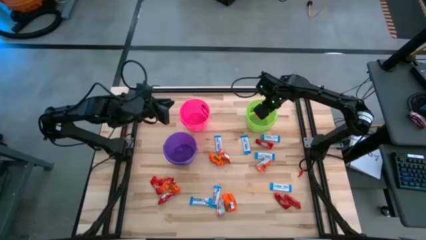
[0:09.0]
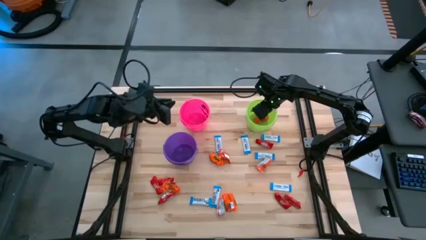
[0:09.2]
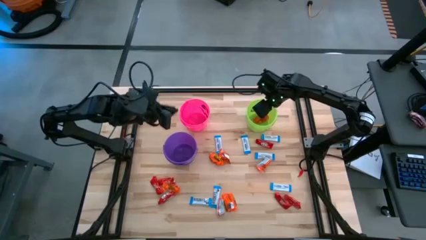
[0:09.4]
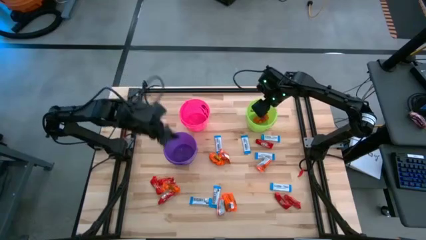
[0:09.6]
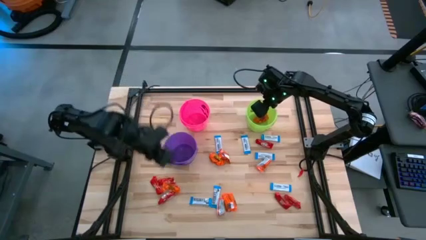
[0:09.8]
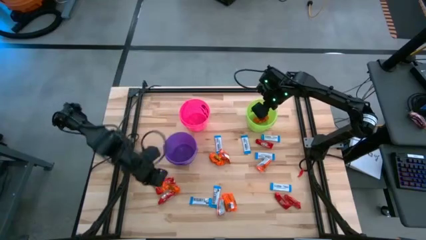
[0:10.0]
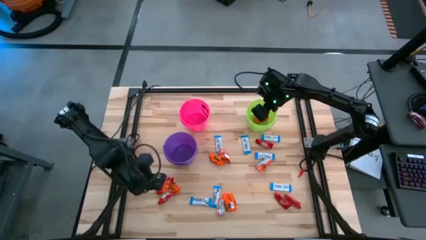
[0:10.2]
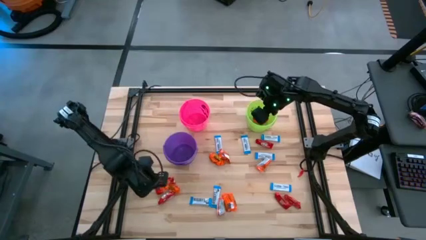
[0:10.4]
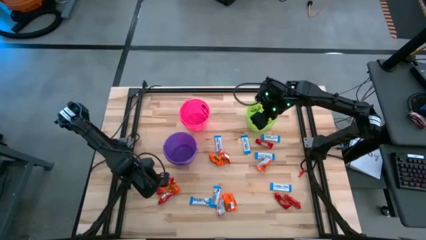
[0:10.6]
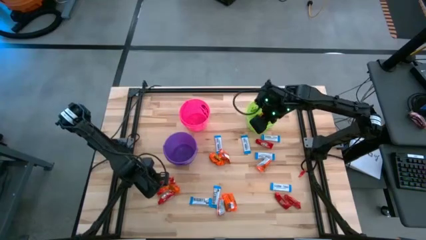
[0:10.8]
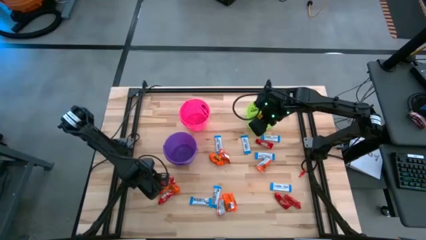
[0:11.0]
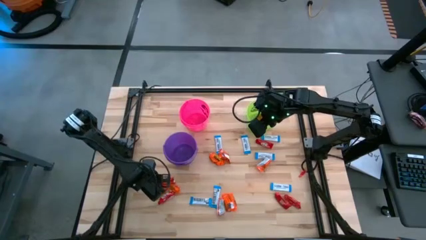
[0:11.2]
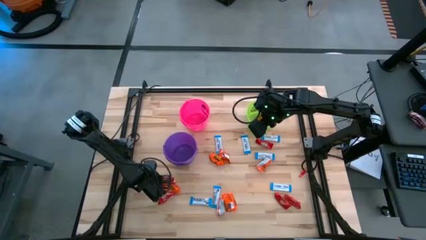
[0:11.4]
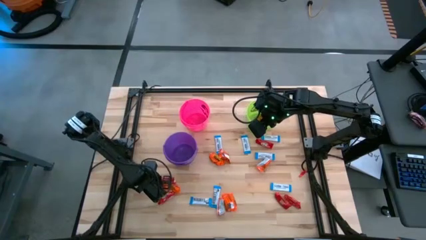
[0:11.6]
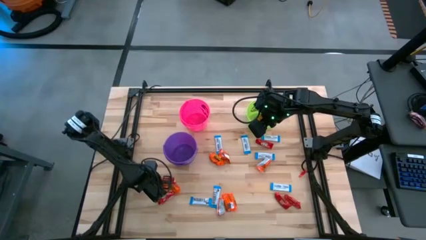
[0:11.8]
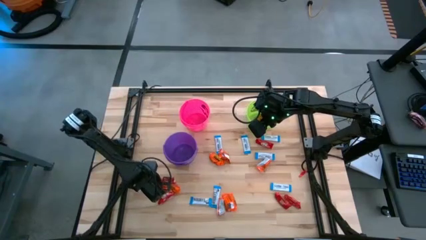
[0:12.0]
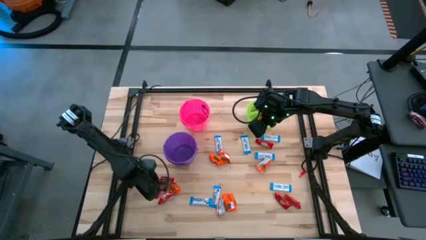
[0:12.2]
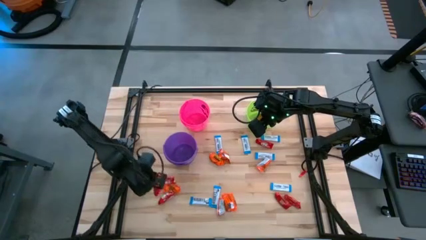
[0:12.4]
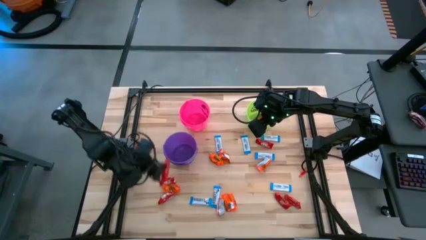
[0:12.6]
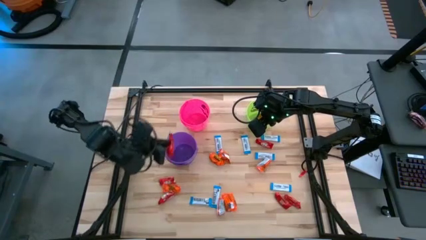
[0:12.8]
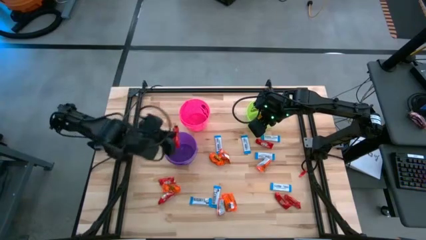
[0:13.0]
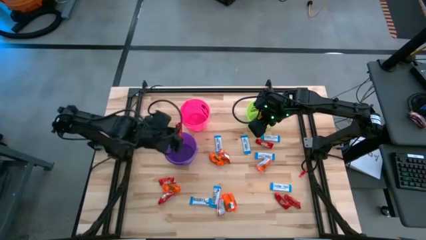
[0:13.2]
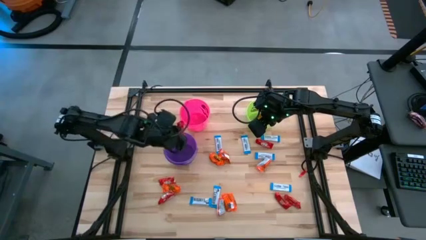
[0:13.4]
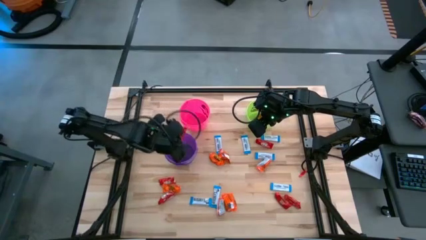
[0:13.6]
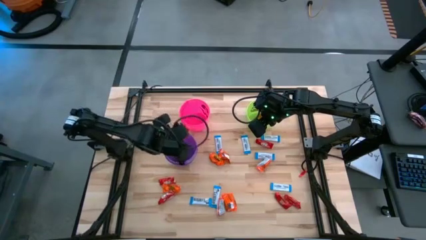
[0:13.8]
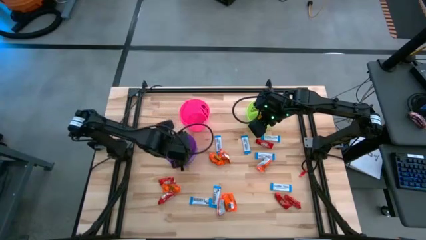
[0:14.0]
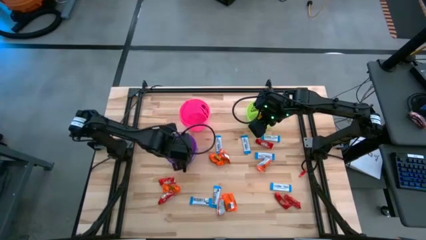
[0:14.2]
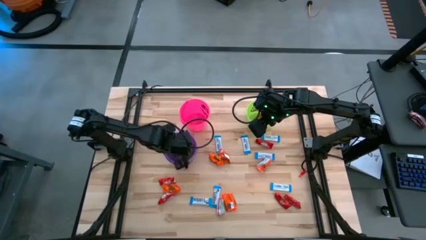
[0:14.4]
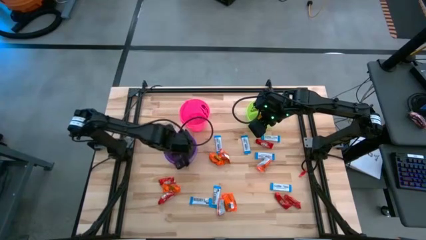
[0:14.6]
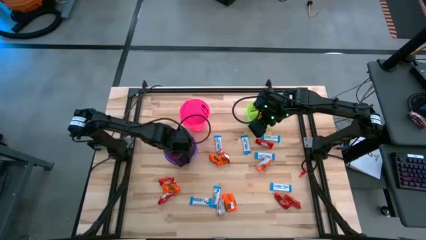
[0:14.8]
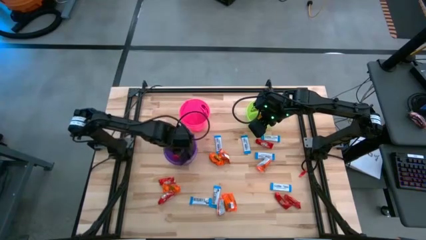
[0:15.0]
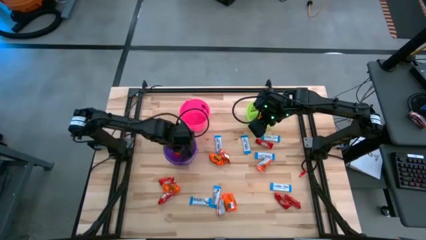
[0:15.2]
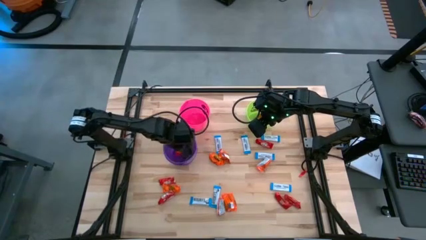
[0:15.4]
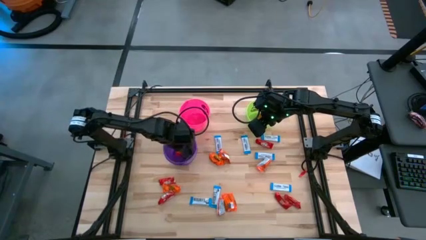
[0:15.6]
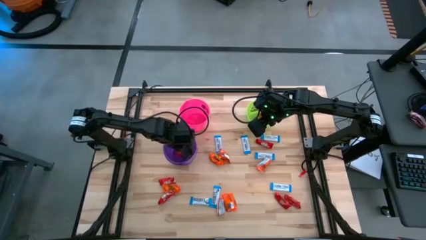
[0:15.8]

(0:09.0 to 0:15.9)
Task: Sort candy
Put the red chocolate into the purple bucket

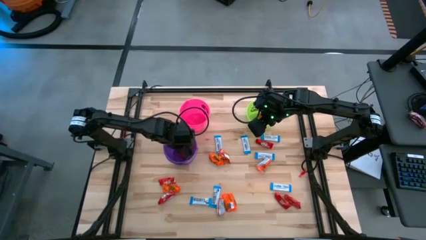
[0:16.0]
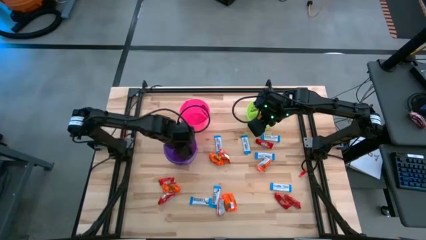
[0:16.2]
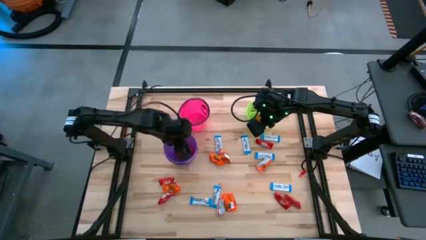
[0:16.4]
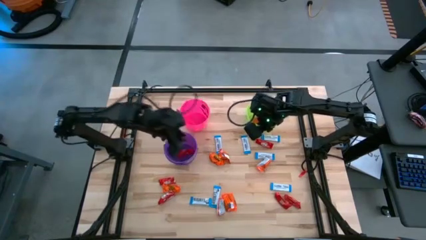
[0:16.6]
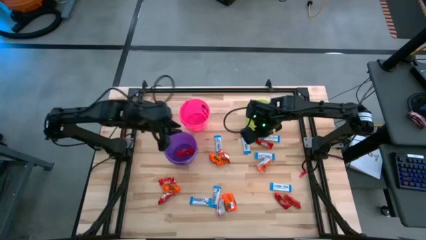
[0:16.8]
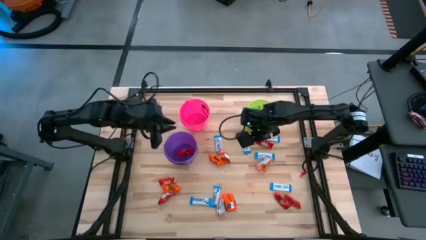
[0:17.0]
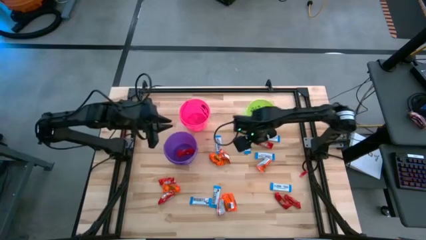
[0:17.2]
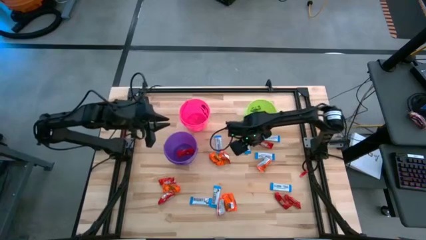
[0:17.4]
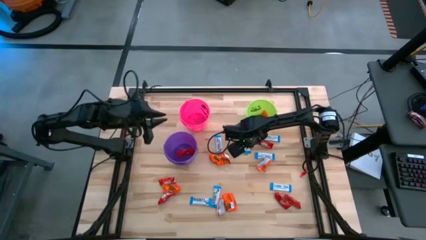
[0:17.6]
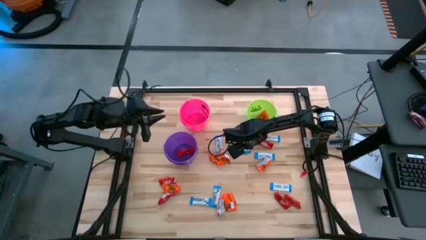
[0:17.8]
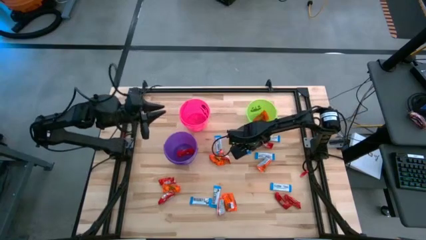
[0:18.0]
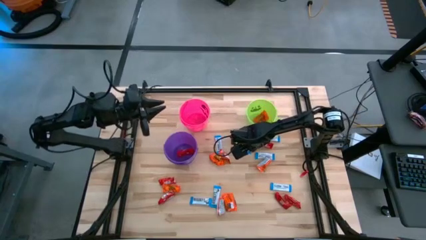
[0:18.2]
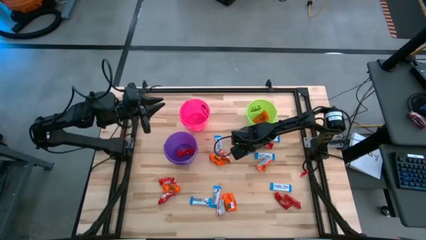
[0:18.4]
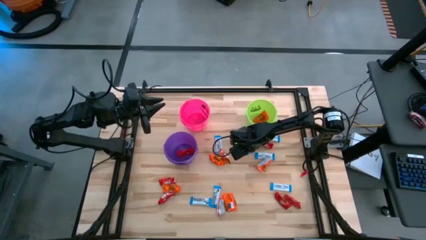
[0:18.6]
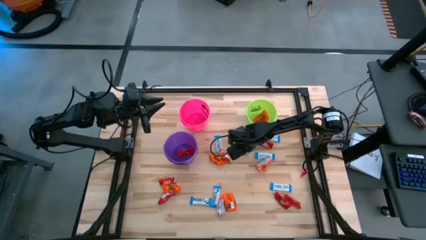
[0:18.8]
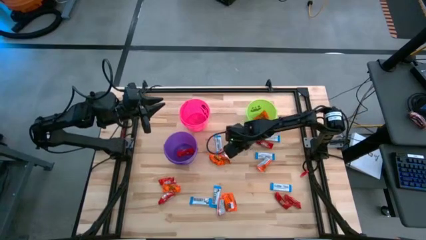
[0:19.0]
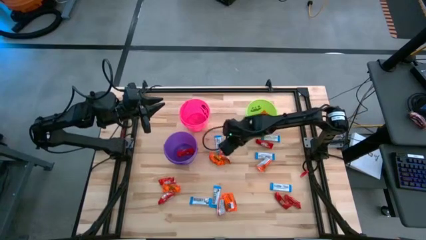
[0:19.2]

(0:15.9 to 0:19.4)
Put the white chocolate into the pink bucket

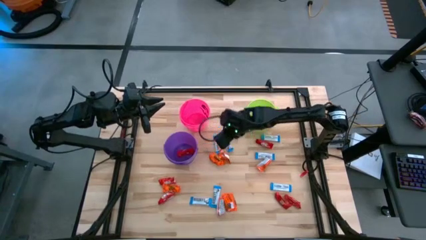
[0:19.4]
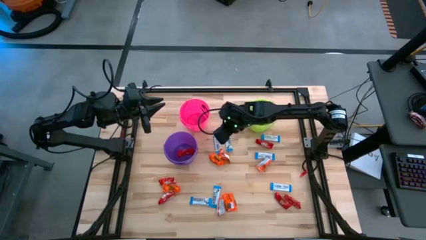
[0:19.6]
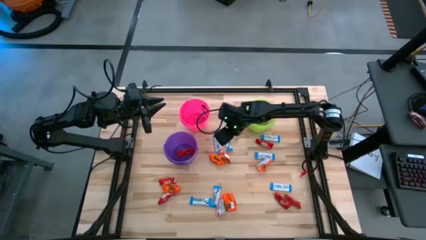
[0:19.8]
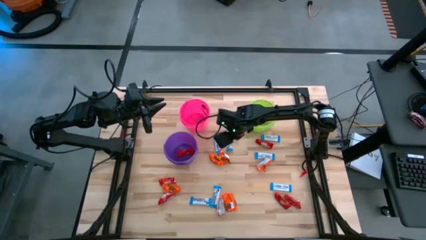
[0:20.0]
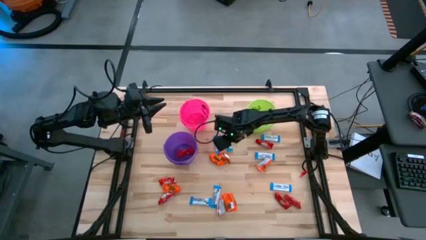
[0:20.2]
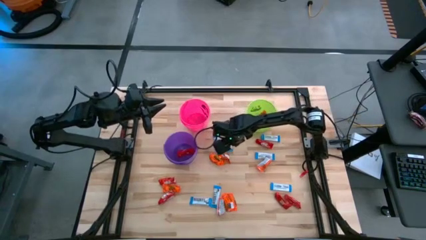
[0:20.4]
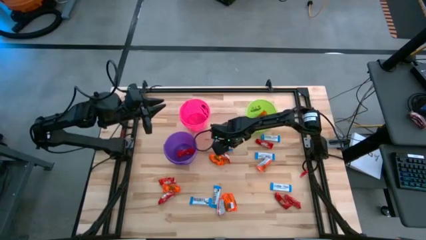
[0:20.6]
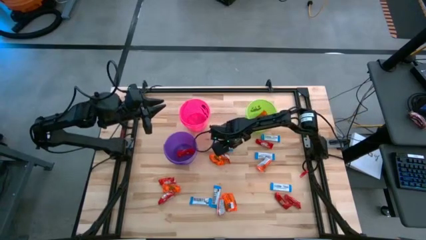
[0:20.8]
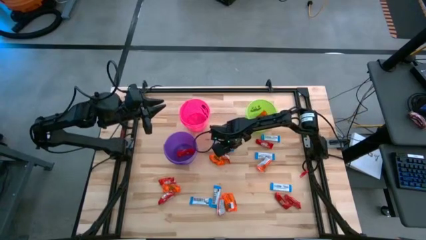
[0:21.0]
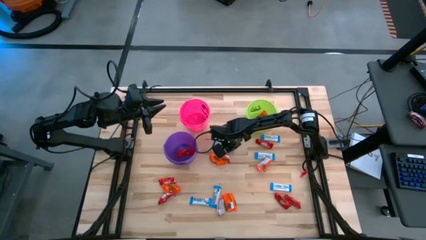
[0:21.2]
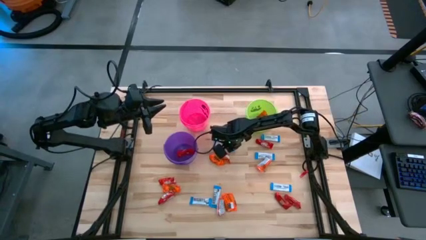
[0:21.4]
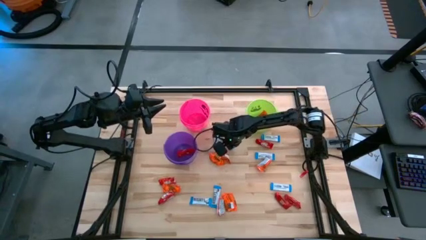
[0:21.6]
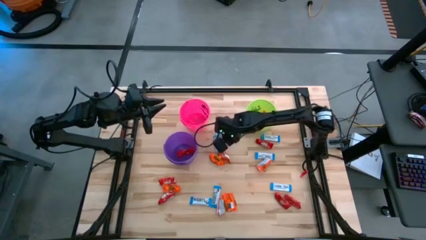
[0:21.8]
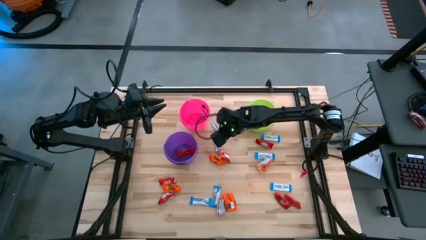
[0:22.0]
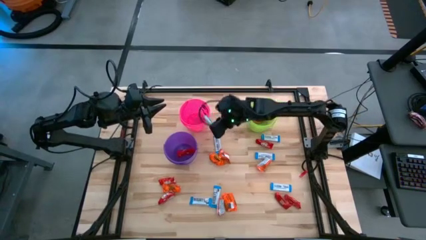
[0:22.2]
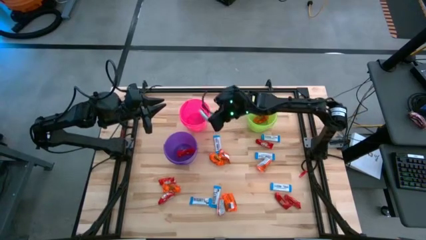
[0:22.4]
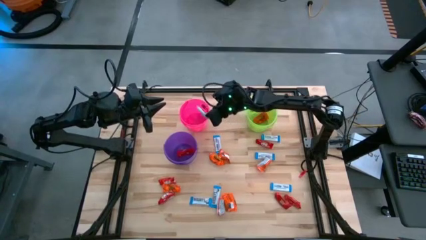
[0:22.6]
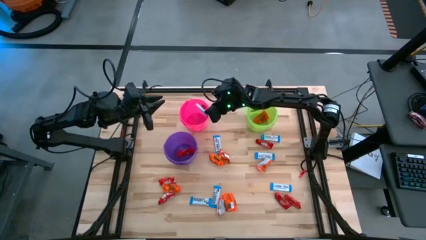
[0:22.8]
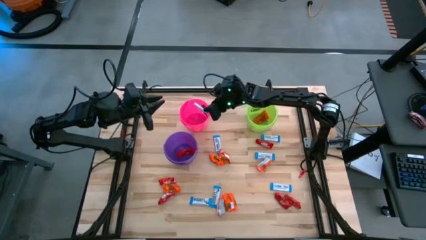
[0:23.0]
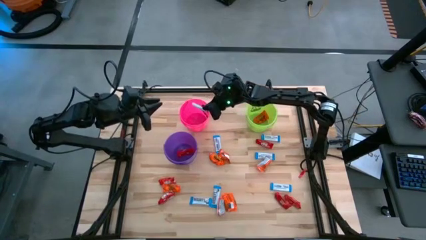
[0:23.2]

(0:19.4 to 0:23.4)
Put the white chocolate into the pink
